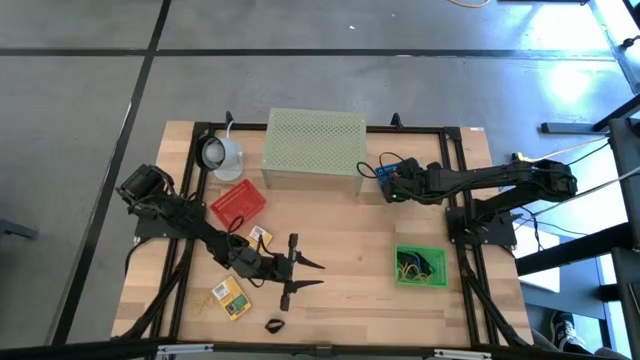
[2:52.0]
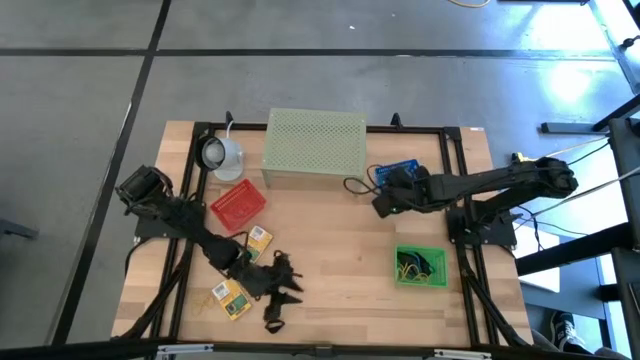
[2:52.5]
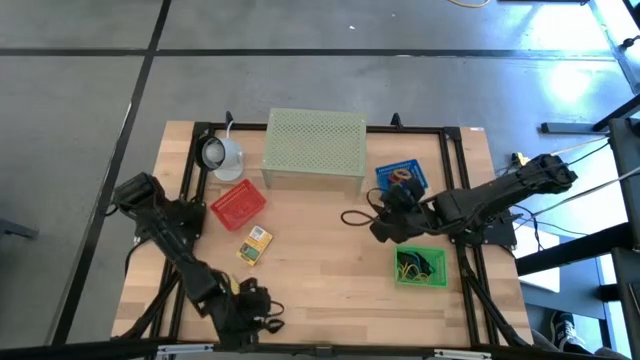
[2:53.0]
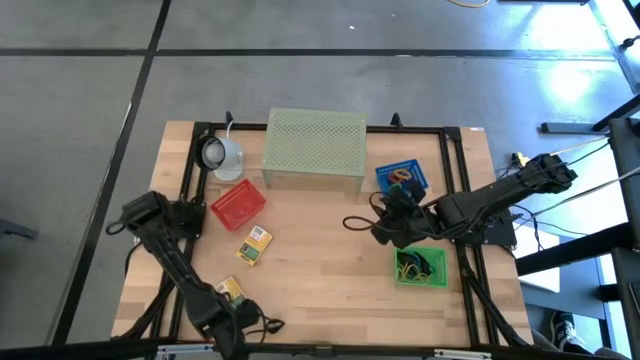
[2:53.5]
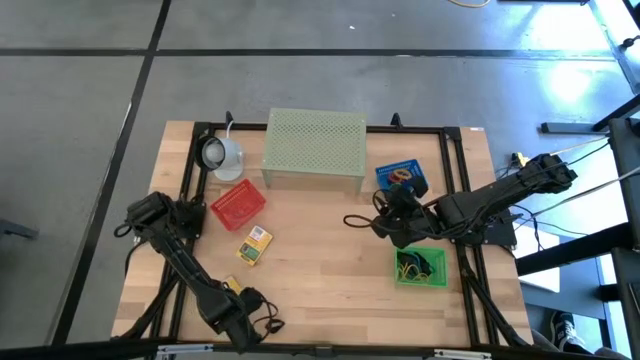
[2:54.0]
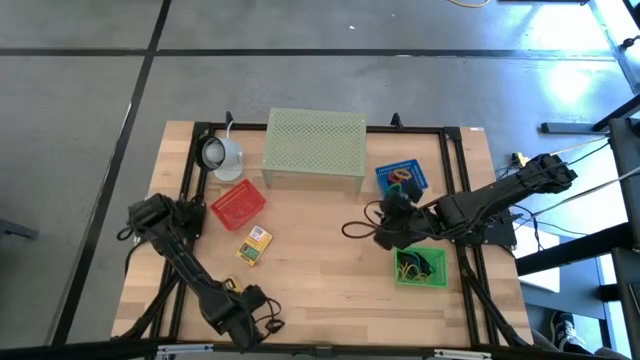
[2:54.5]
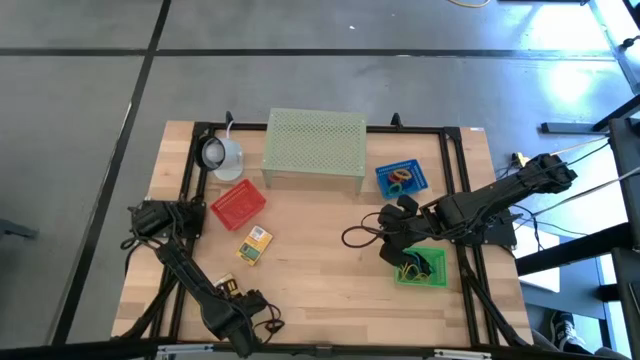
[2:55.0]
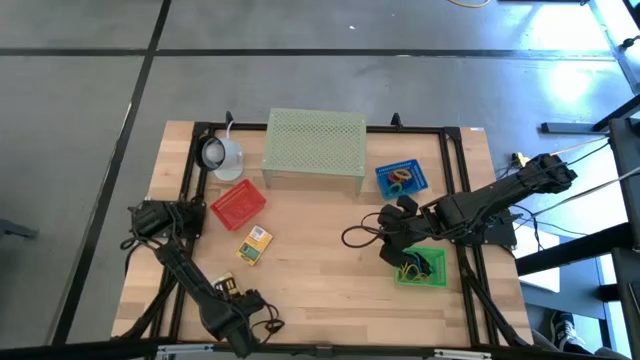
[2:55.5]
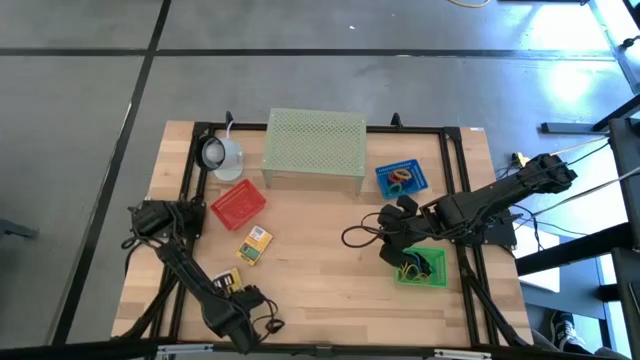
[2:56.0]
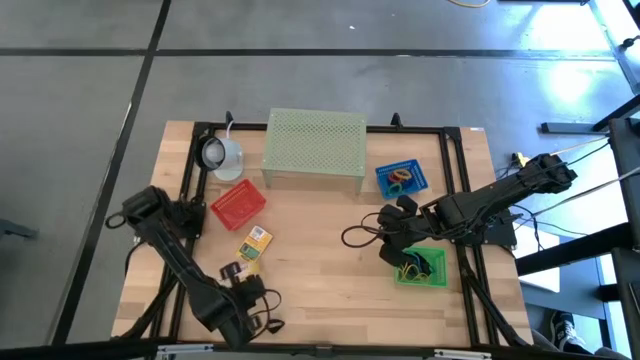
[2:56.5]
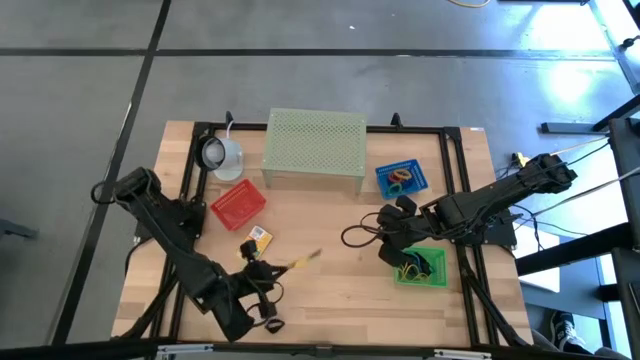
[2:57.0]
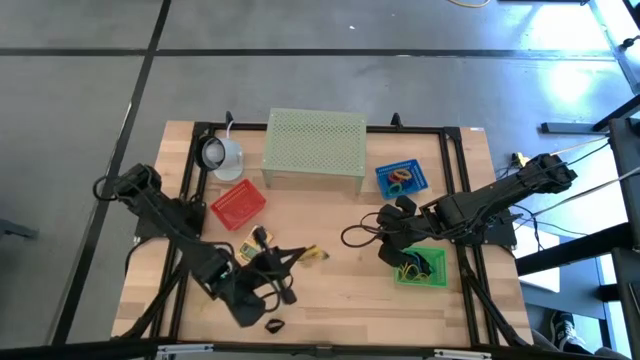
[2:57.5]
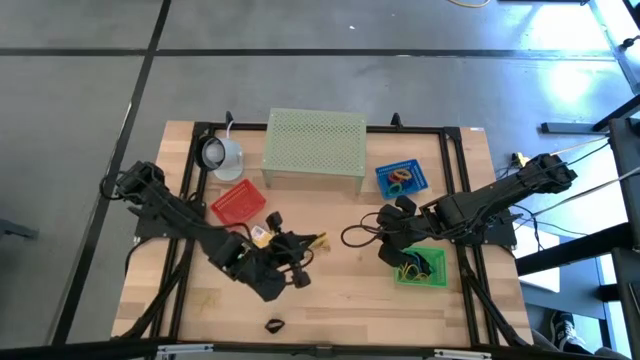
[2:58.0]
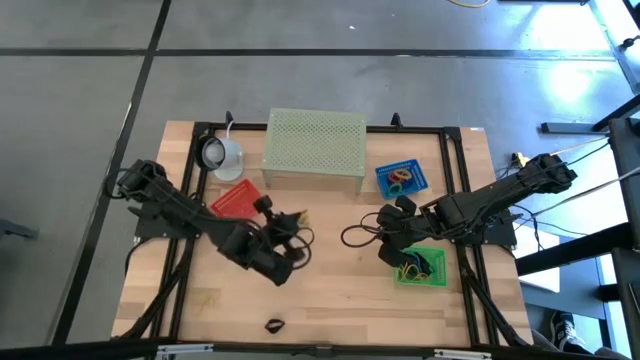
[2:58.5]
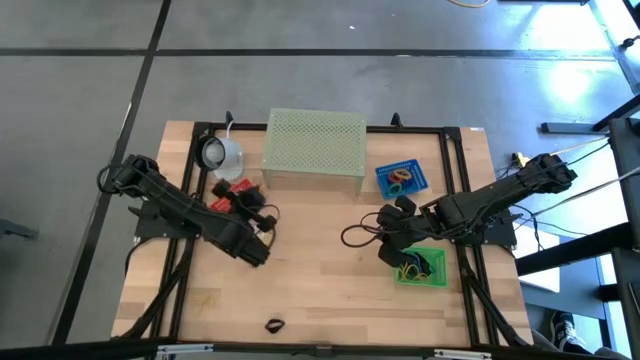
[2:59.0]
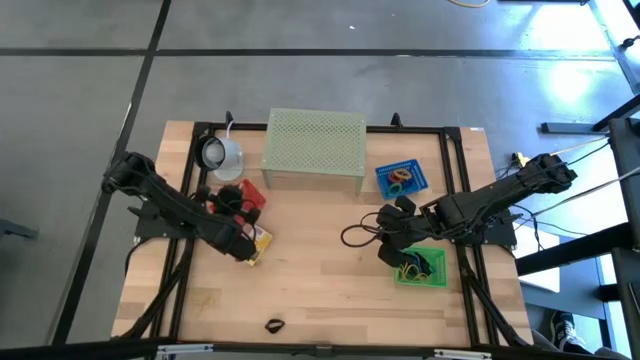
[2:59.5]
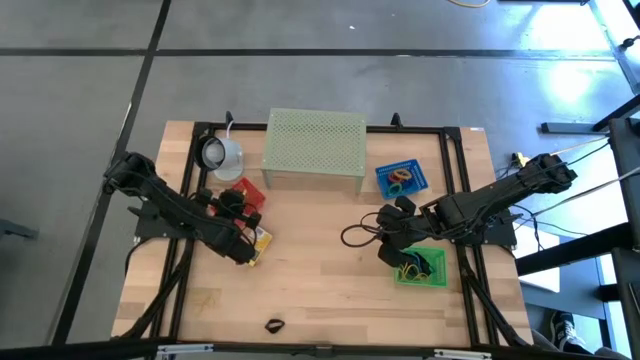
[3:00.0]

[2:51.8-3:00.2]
Task: Pick & Place Office Desk Supplies
Put the yellow crayon box into the red bin

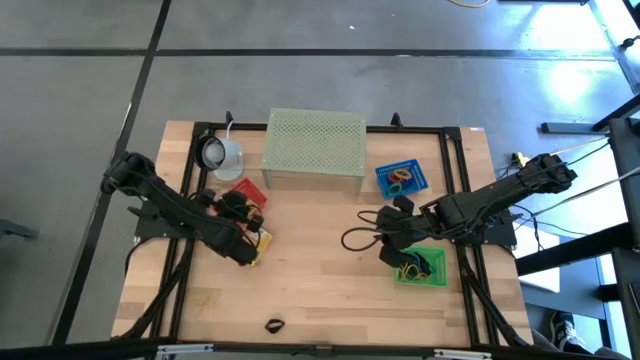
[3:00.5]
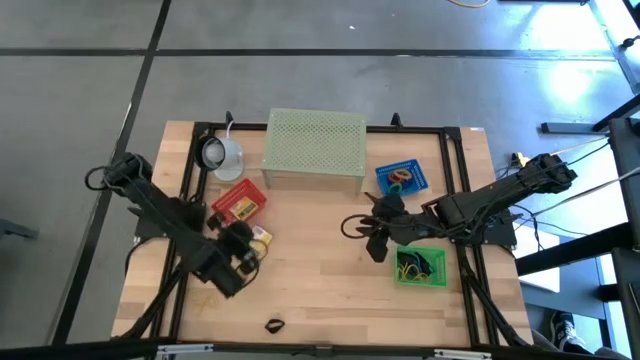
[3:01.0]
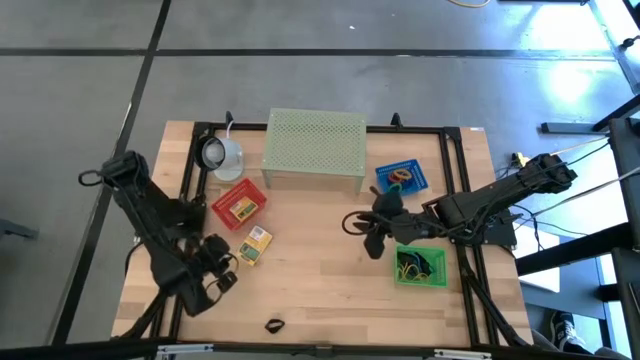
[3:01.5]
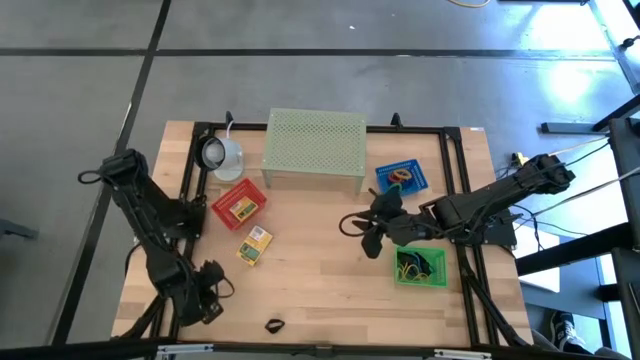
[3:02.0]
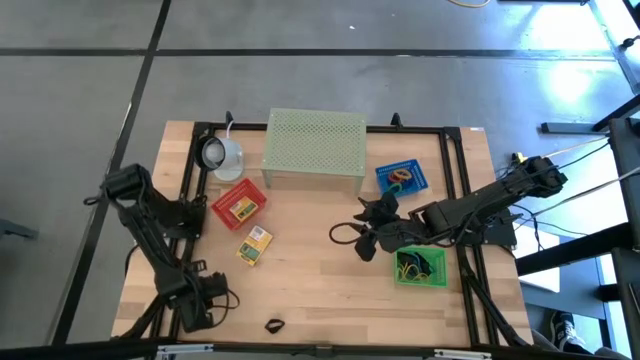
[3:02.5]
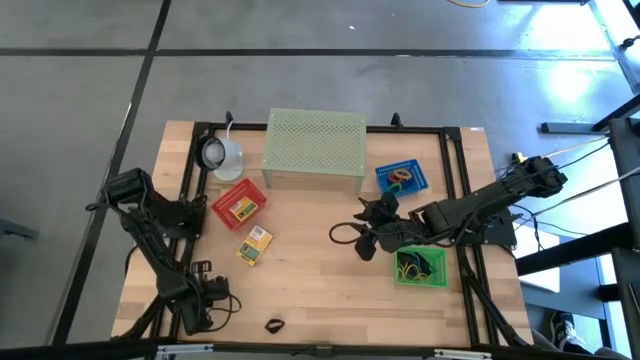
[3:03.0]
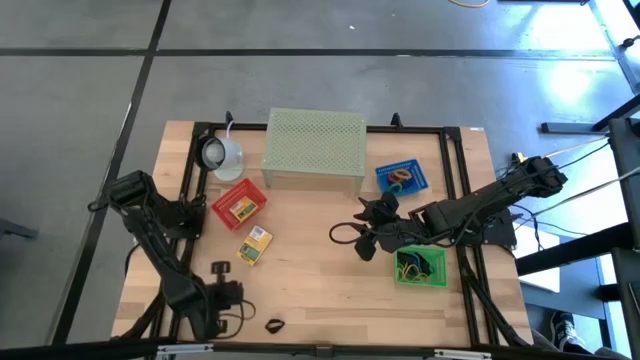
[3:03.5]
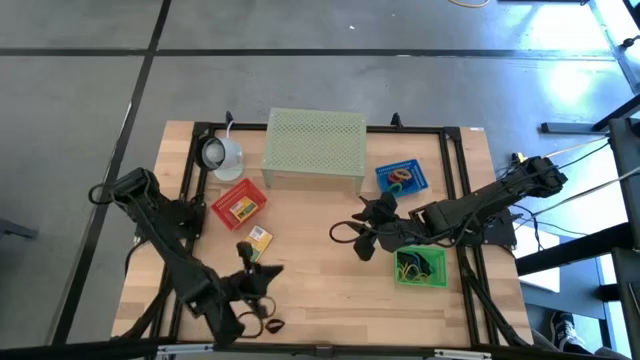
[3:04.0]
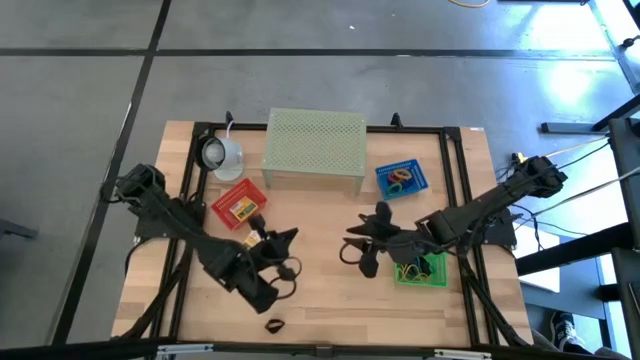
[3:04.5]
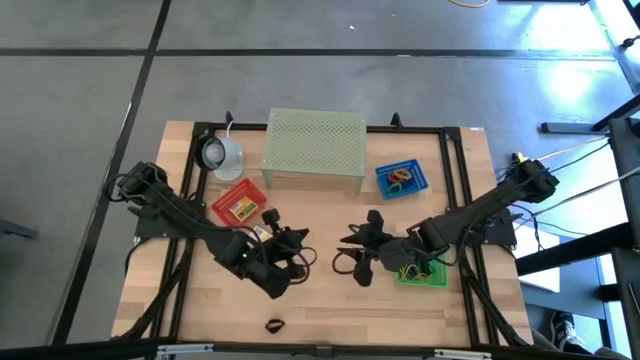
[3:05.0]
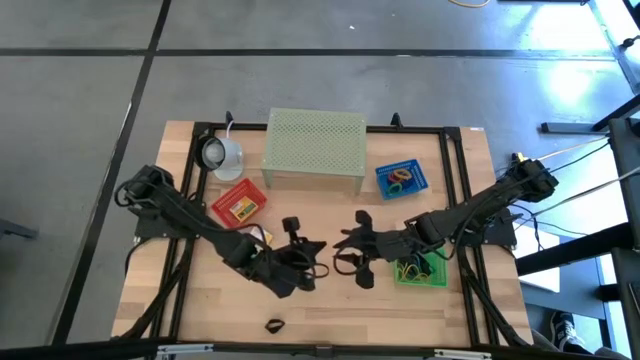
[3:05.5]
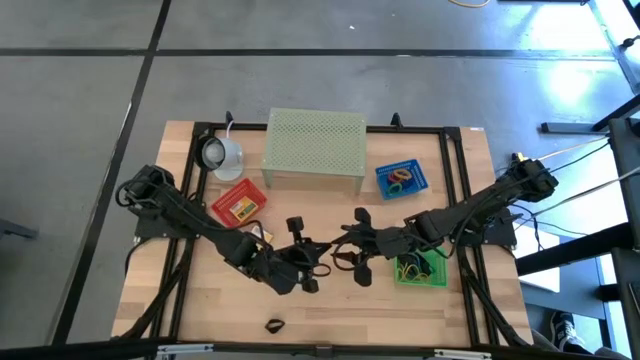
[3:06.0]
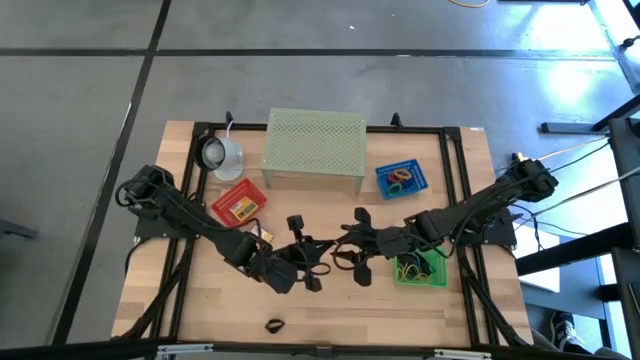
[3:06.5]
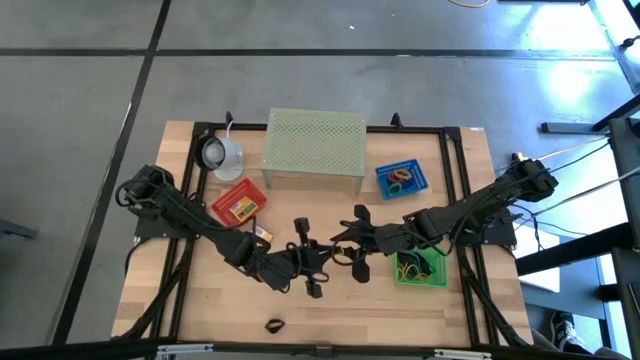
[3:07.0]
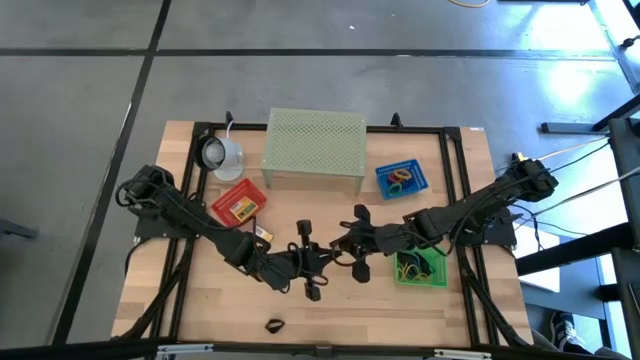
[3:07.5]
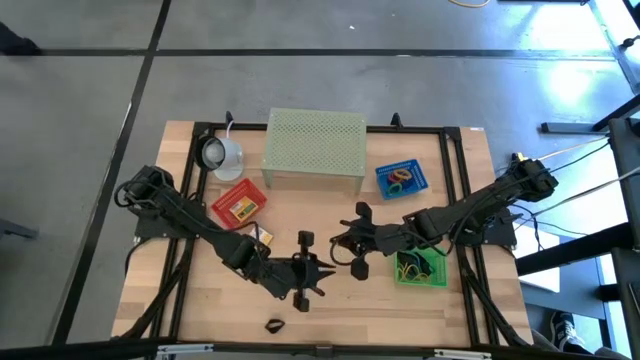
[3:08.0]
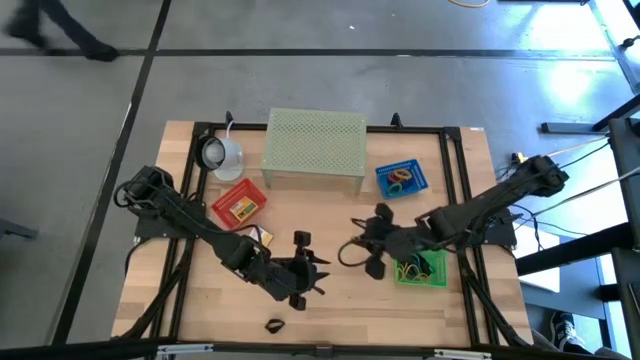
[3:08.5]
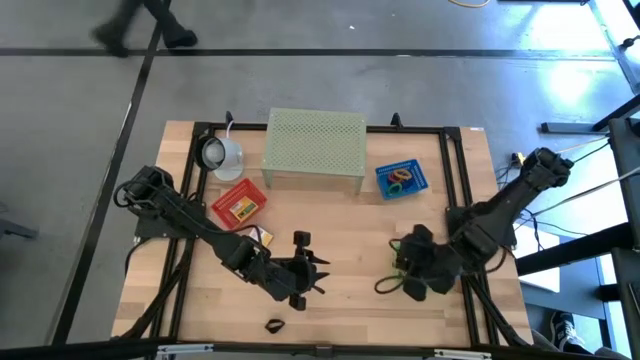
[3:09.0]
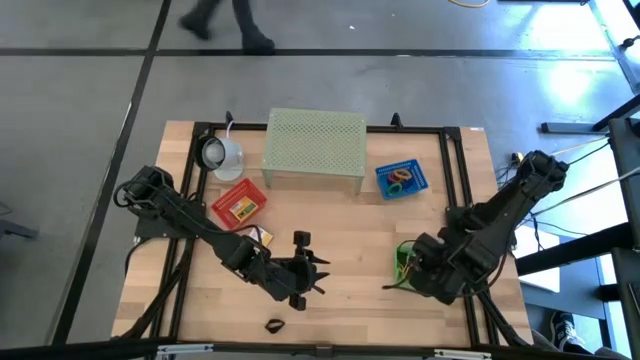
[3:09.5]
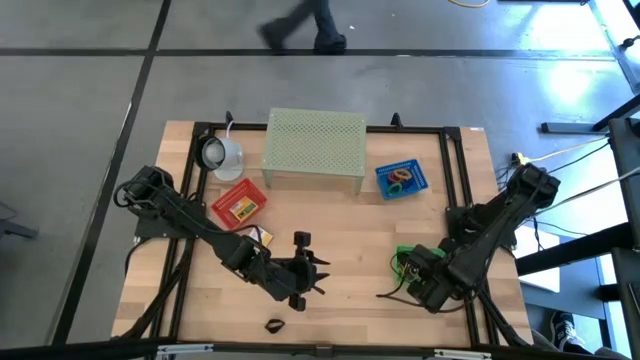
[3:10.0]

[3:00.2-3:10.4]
Put the yellow rubber band into the green bin

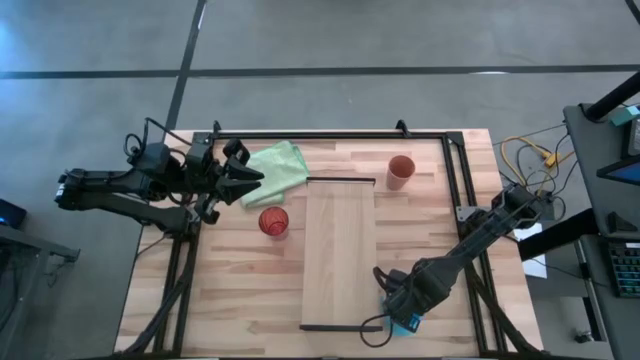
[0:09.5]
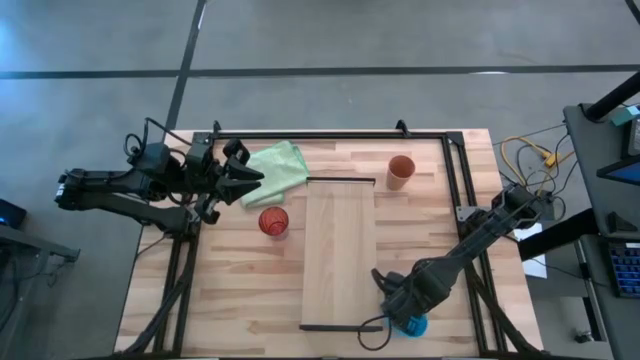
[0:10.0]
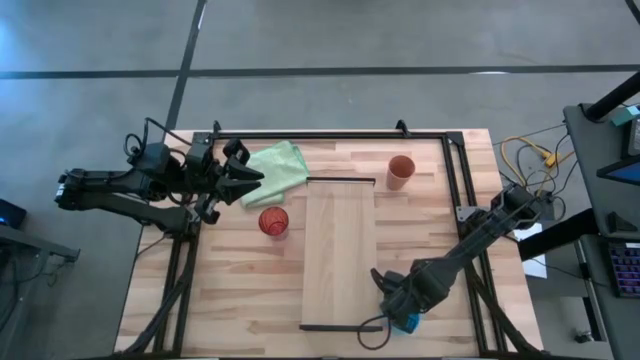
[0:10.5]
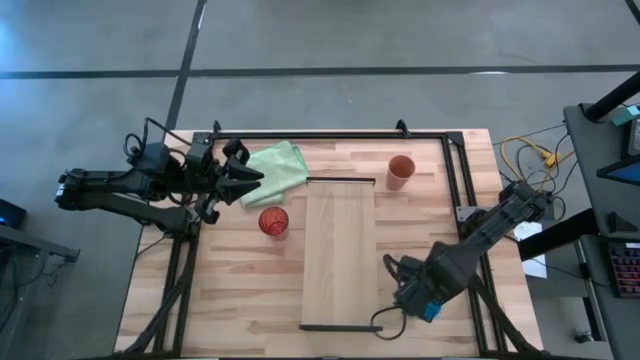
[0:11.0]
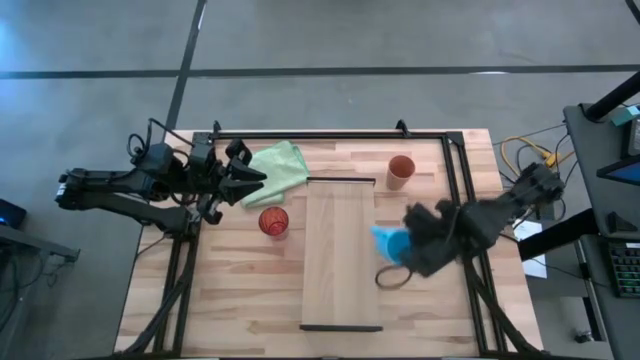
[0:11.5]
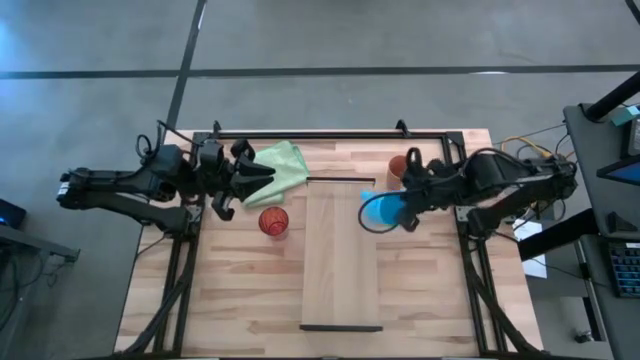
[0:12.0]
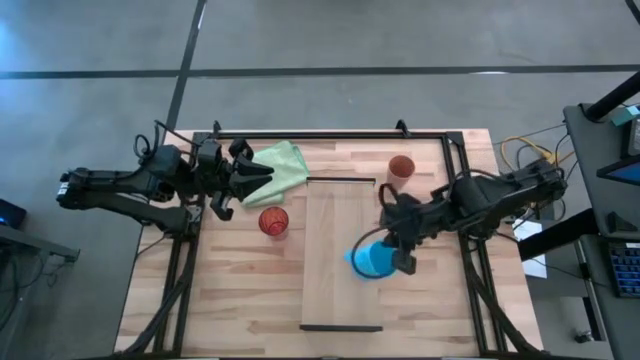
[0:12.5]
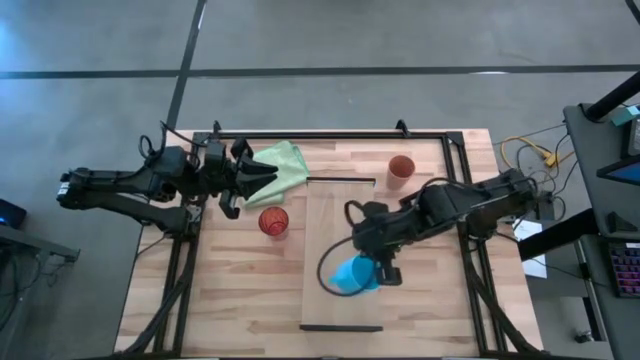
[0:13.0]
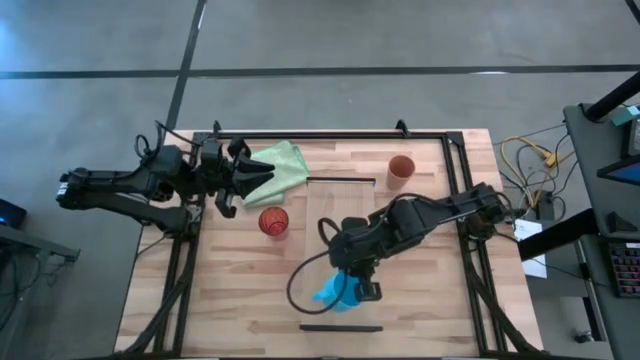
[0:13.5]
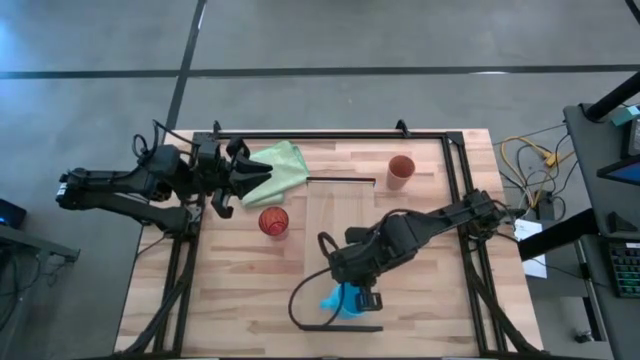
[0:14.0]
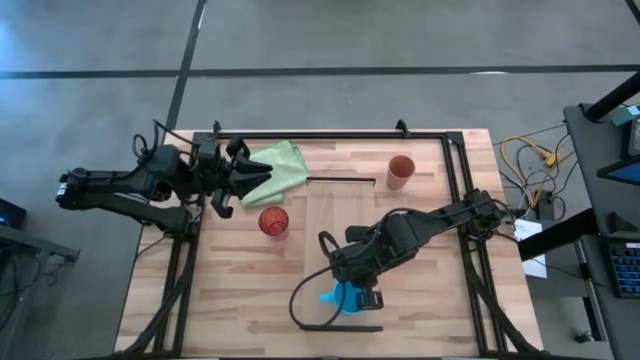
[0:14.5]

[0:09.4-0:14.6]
Task: Stack small to large cups/mugs on shelf
Put the blue mug on the shelf
